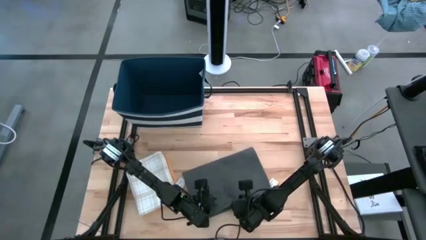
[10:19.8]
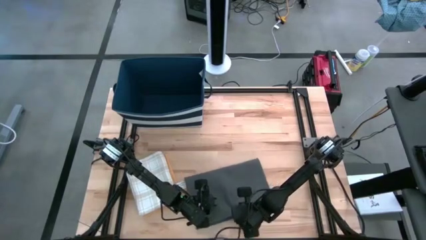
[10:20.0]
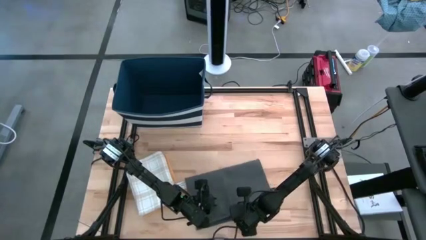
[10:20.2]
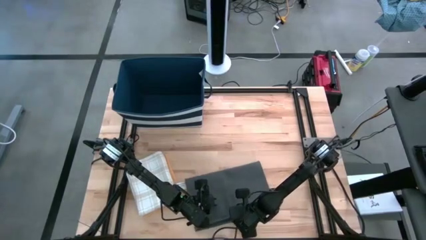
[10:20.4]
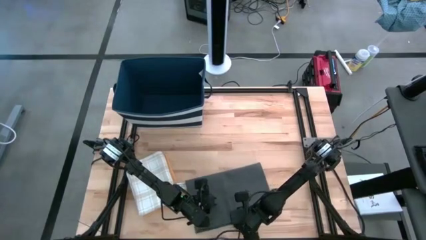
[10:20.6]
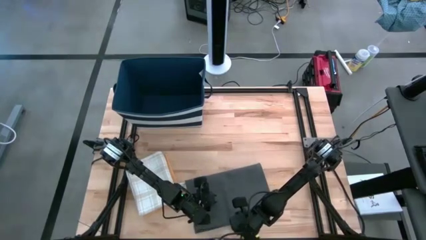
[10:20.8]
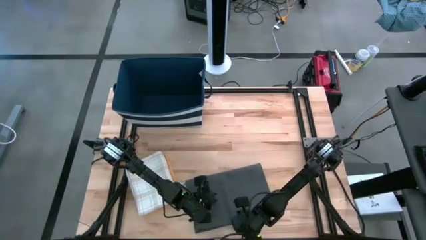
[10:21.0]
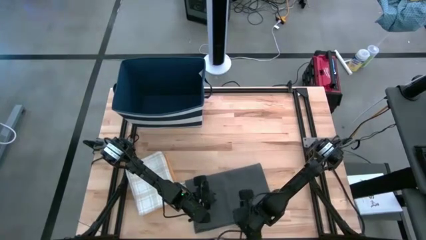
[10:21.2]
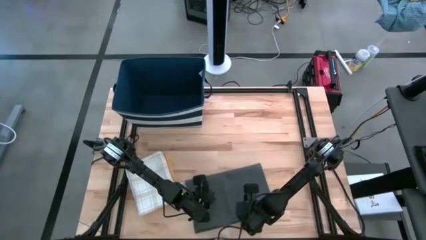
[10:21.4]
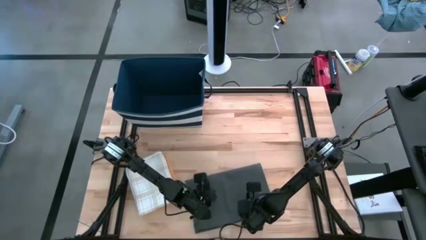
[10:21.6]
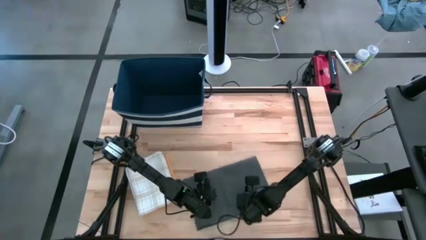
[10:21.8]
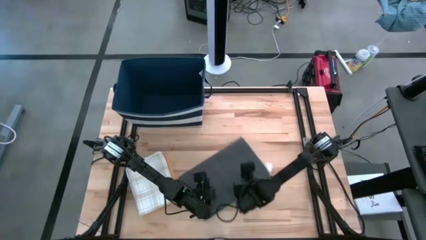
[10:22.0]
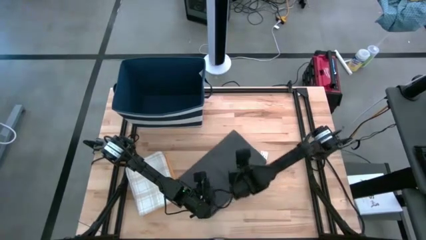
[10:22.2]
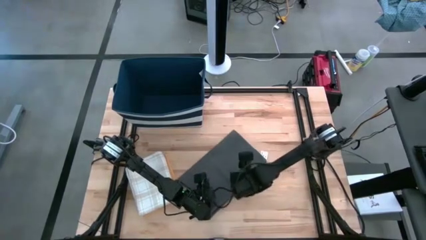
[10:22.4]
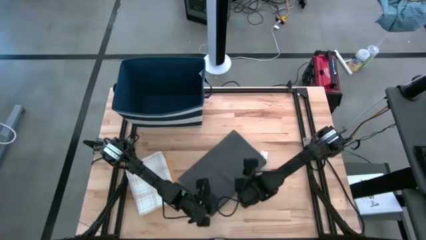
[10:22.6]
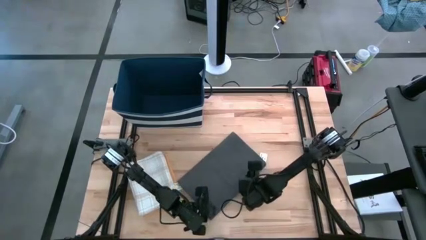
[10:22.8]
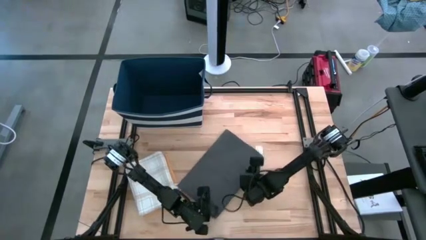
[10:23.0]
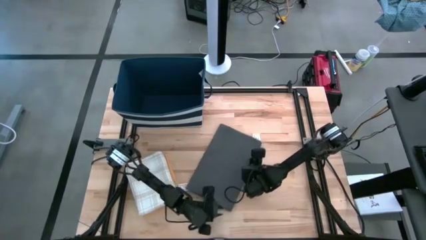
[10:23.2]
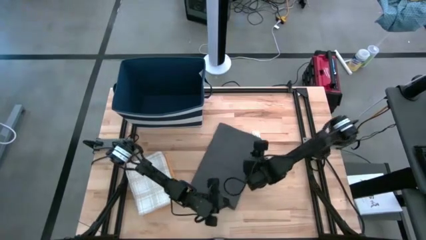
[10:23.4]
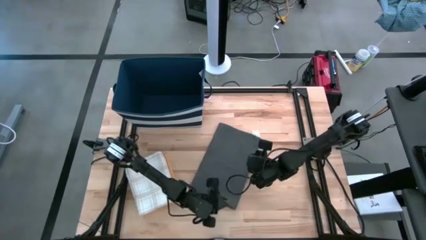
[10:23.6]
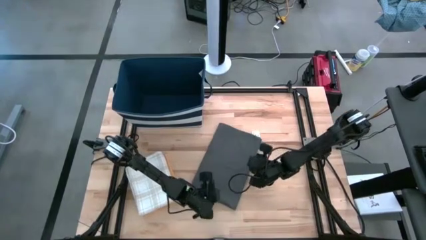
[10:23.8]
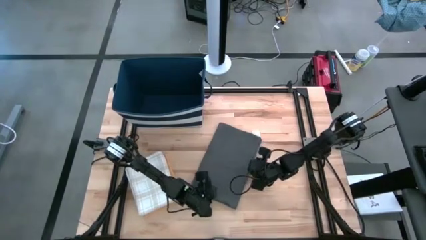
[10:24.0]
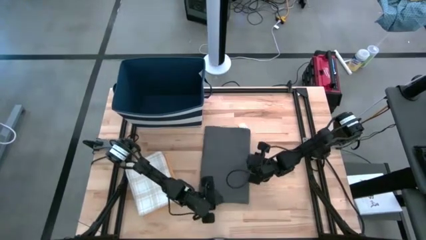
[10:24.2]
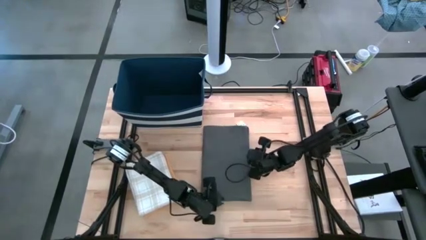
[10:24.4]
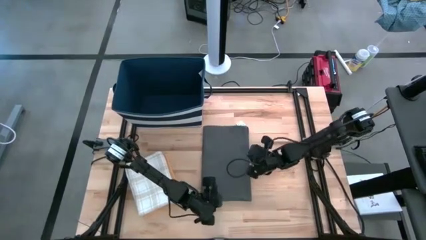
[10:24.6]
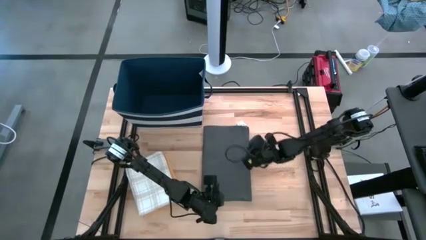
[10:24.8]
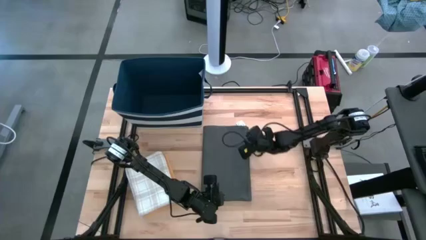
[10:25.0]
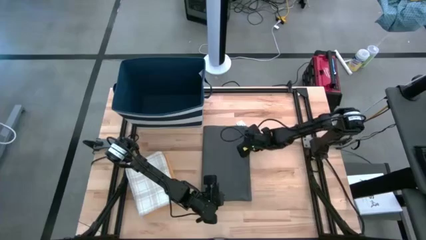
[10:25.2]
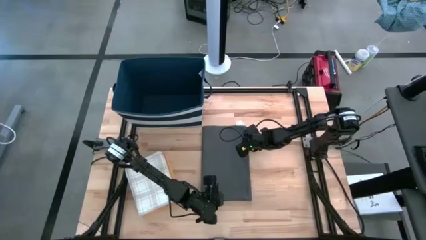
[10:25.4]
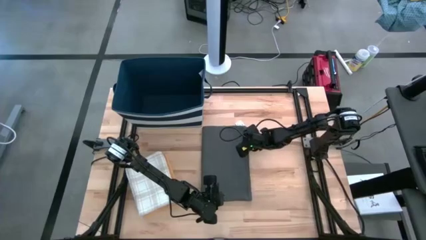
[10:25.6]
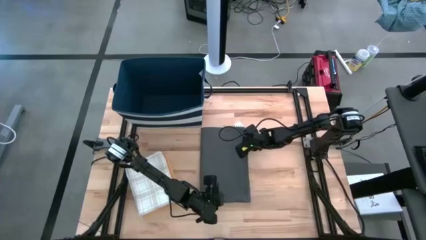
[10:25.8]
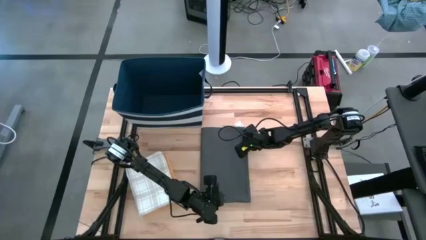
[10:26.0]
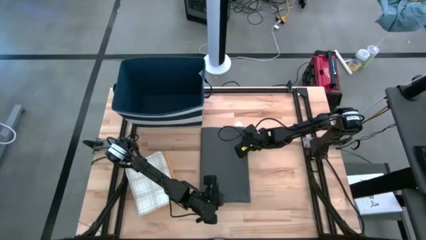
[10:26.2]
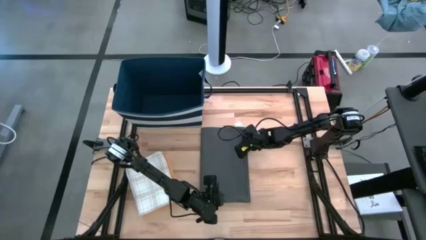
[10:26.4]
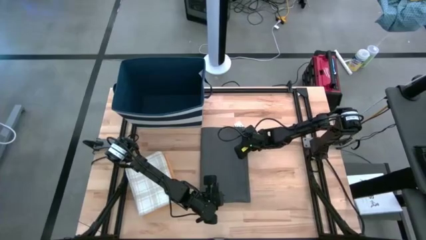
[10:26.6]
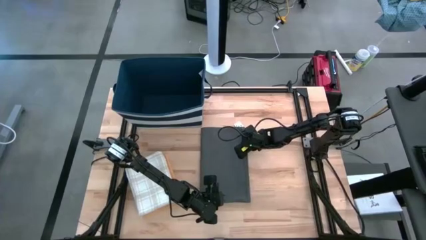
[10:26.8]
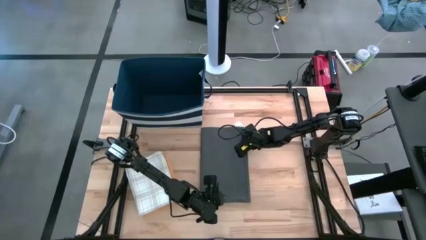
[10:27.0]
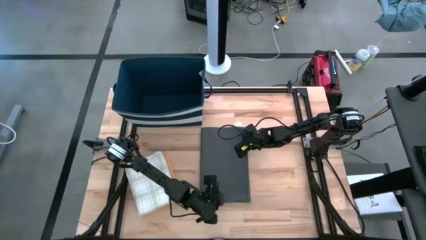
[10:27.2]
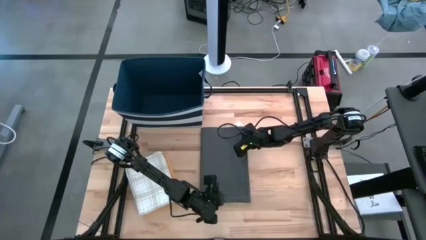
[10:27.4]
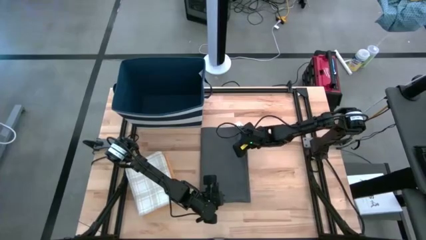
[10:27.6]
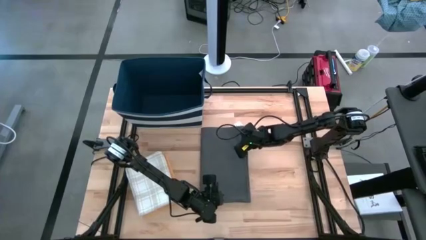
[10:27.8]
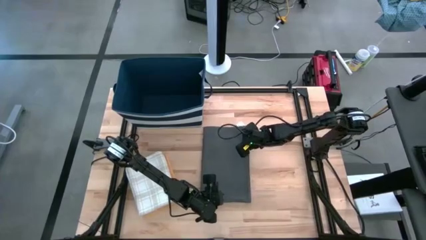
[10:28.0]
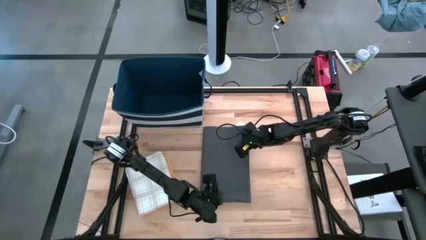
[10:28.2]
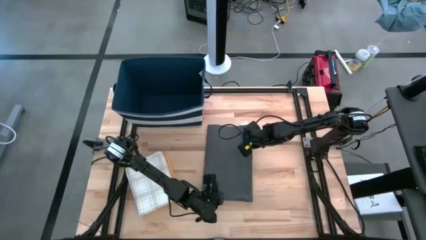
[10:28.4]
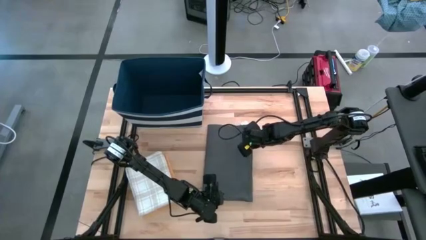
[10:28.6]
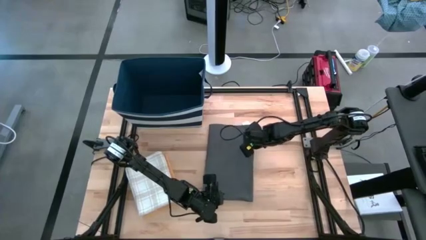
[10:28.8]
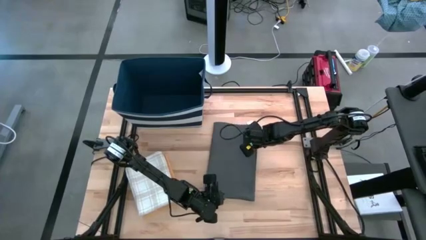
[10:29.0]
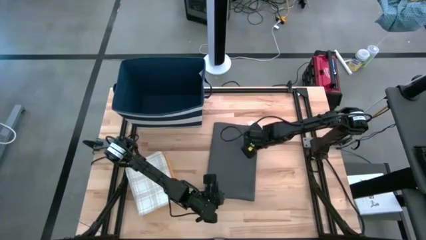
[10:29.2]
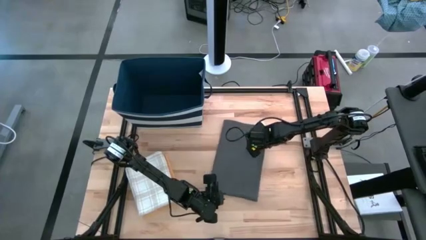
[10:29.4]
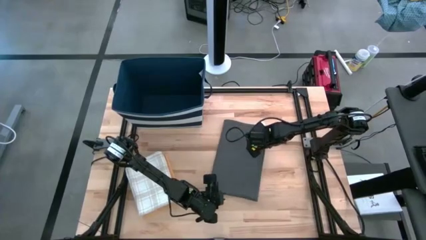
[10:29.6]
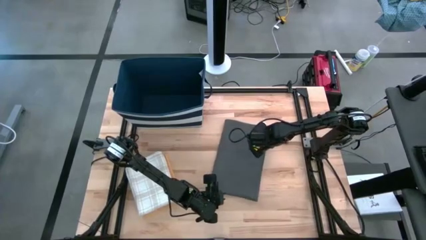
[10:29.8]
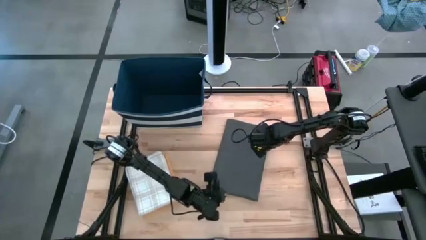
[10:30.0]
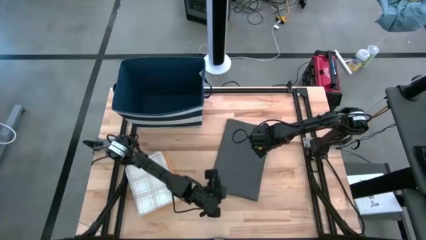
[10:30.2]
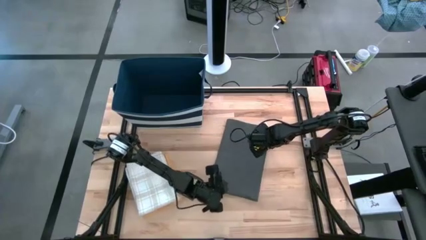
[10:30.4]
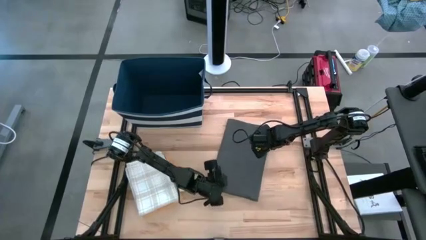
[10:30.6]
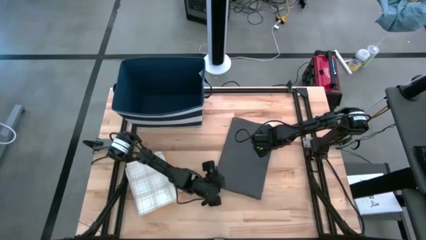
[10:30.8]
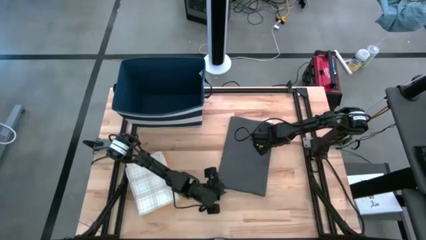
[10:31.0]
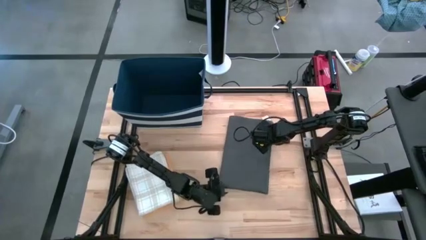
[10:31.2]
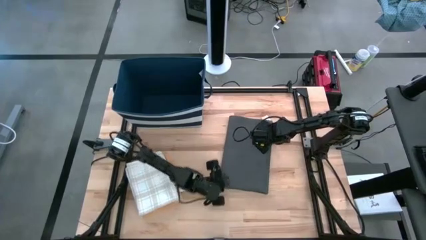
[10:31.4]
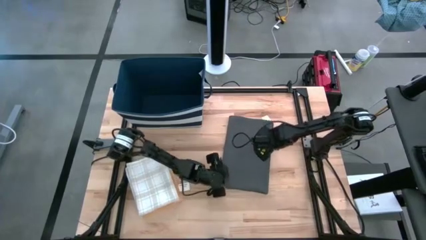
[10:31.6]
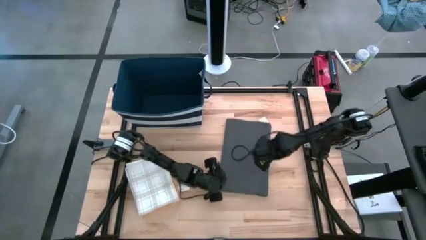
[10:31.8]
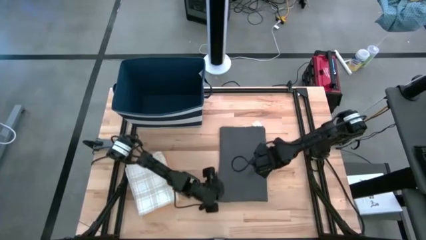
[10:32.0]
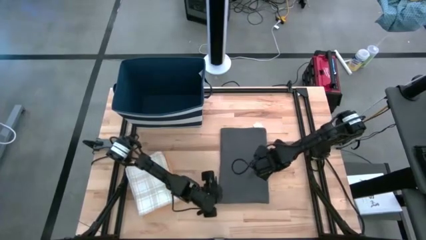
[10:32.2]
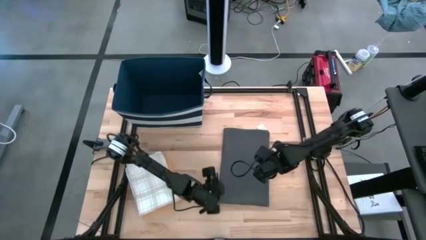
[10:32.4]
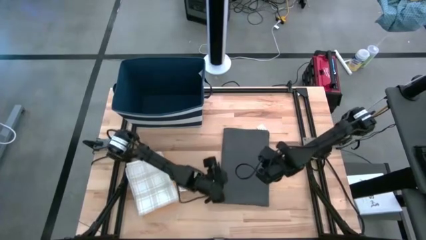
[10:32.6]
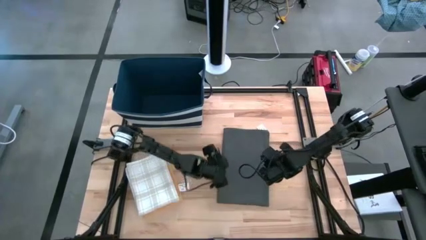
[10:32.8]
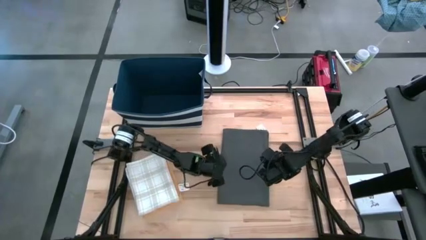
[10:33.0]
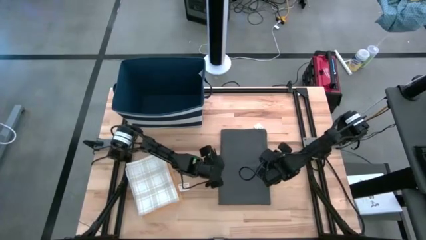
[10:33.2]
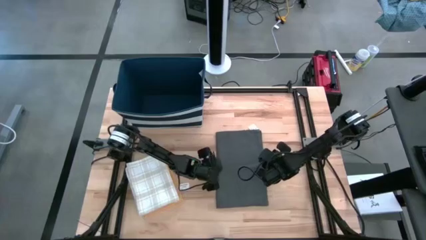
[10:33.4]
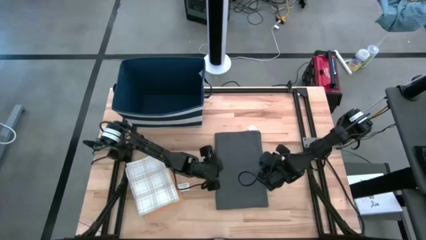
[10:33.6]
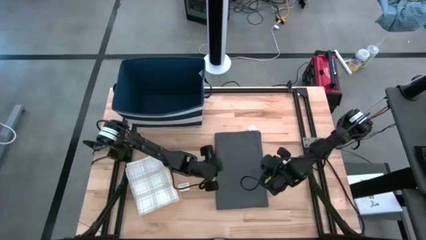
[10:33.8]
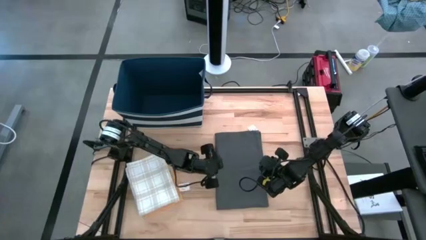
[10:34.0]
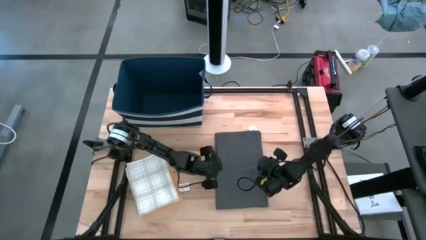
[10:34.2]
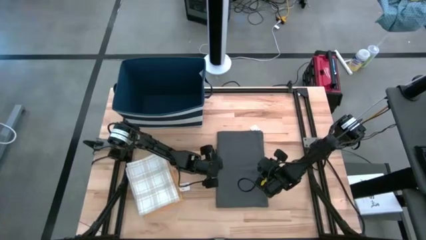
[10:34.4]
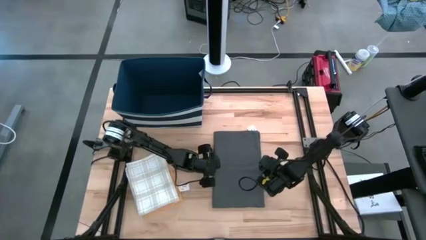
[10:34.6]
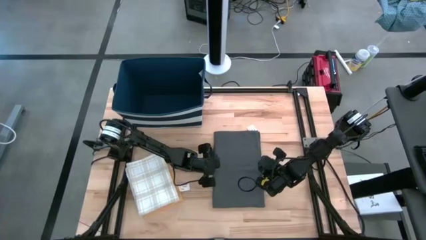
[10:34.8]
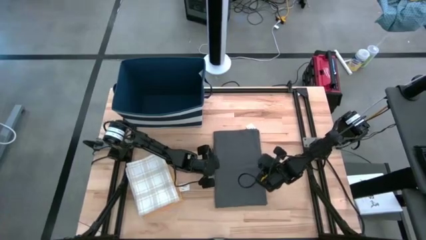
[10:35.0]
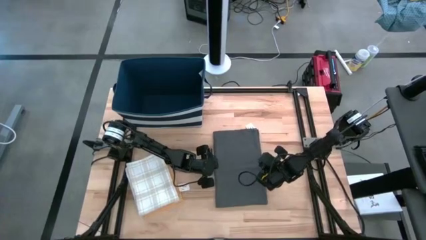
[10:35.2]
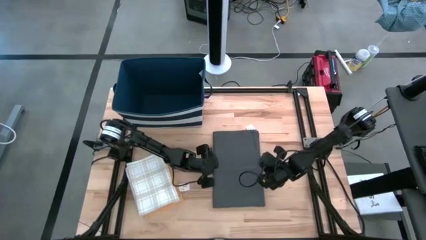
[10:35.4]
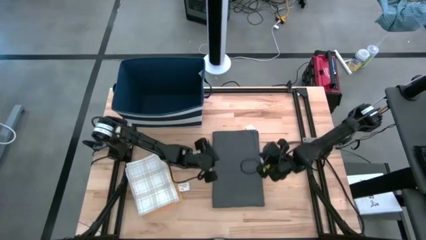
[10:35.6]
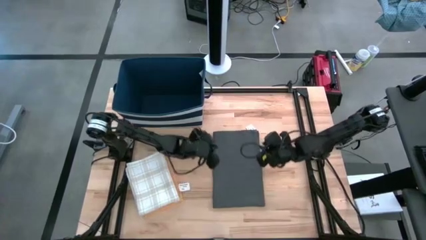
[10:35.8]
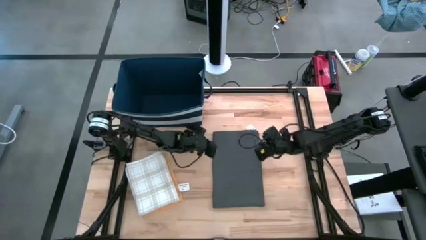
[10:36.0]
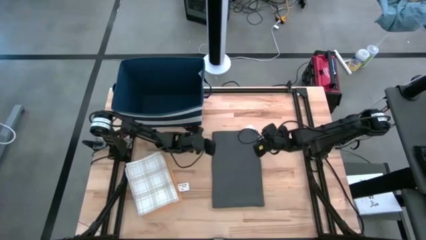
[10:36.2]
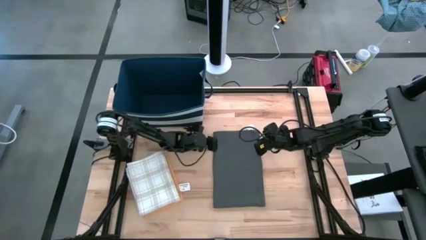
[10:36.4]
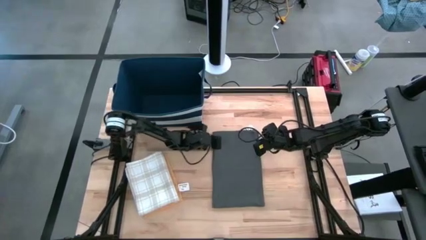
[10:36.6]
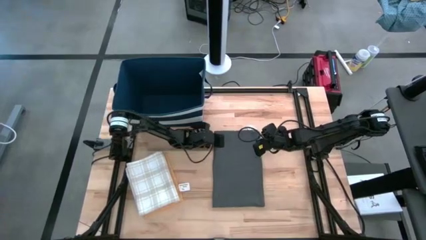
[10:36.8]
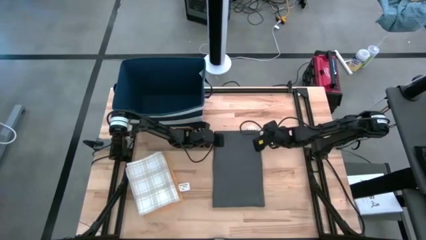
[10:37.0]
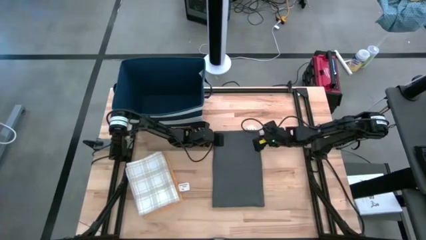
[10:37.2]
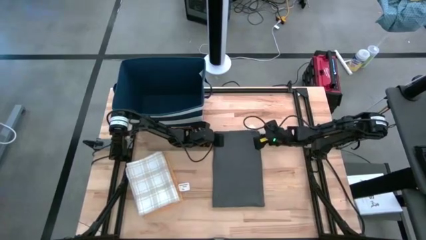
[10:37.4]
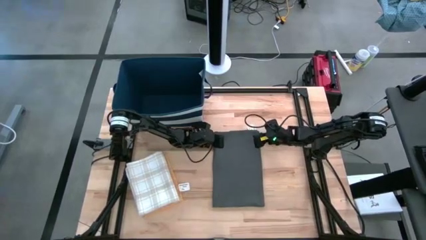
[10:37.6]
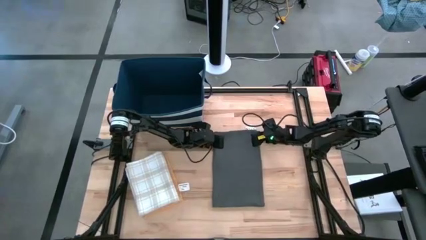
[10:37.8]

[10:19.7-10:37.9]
Task: Fold towel
Fold the gray kitchen towel
